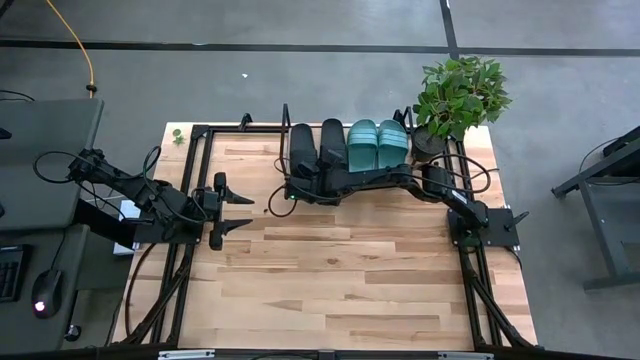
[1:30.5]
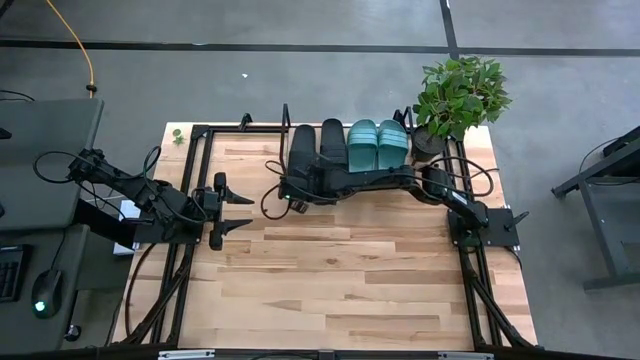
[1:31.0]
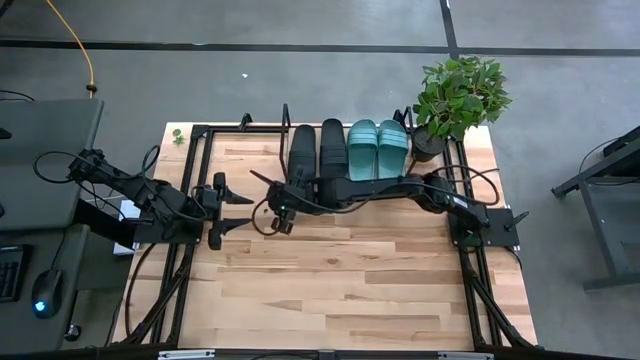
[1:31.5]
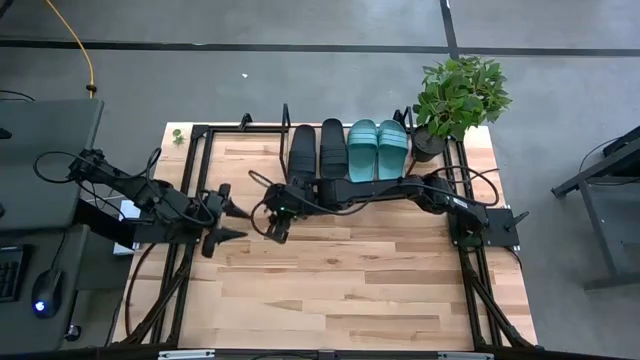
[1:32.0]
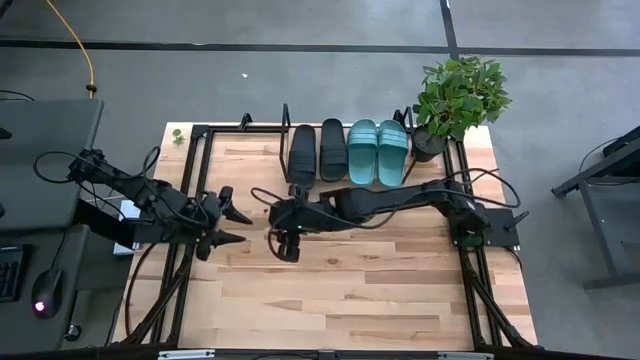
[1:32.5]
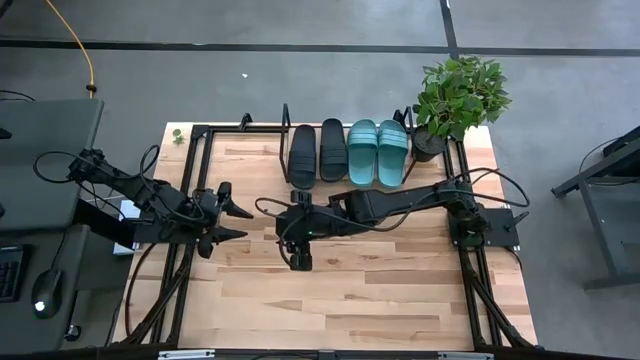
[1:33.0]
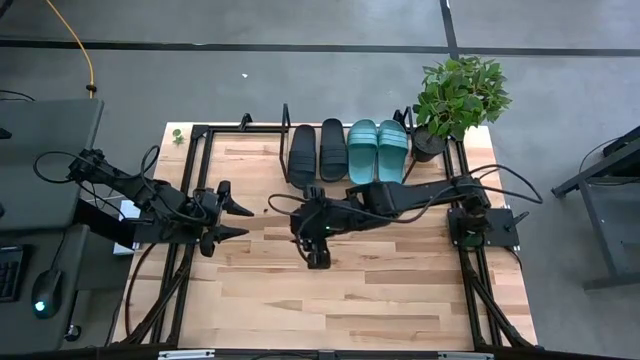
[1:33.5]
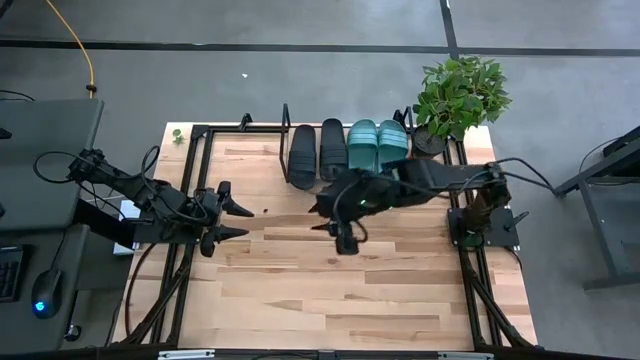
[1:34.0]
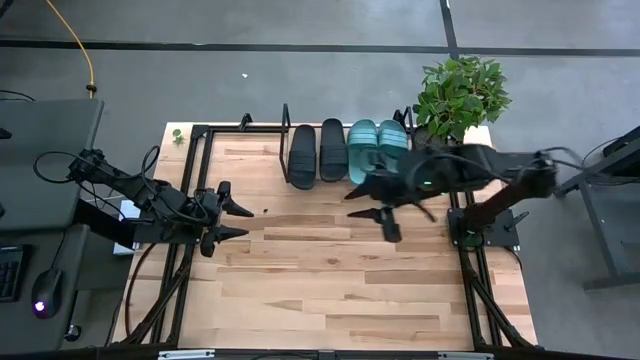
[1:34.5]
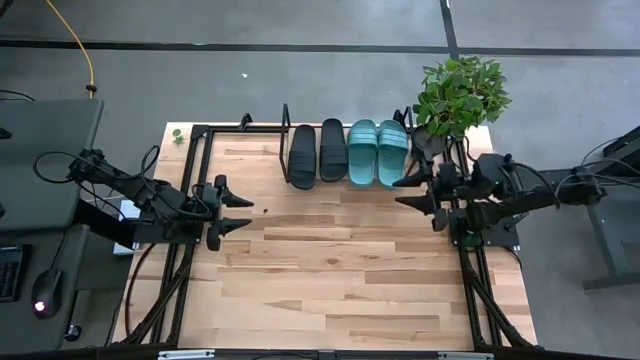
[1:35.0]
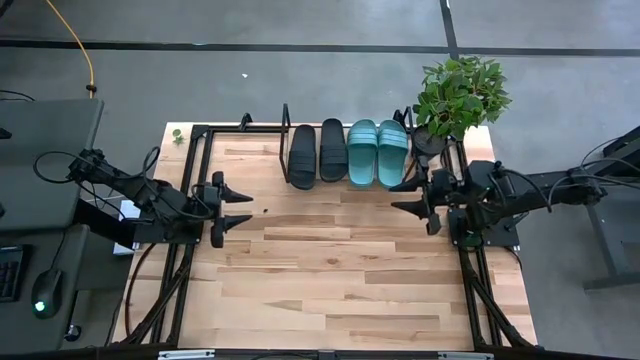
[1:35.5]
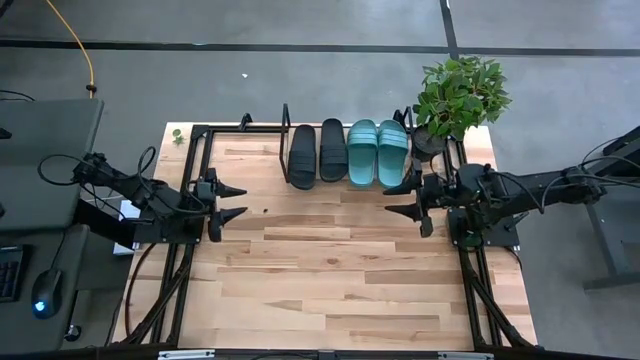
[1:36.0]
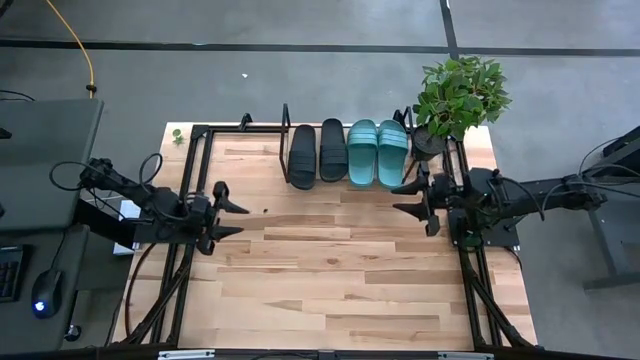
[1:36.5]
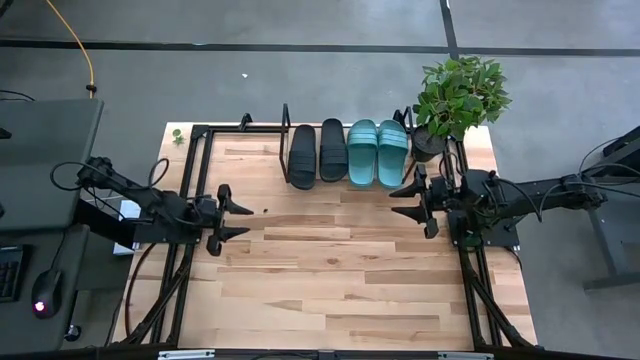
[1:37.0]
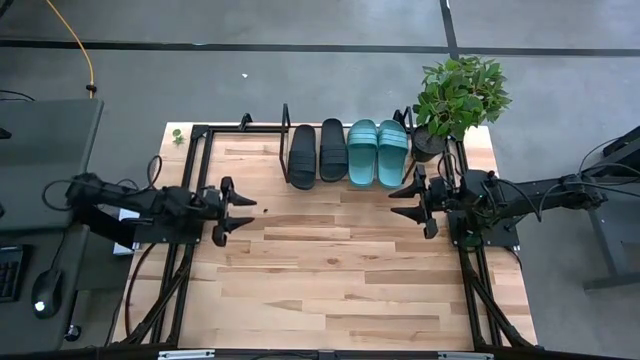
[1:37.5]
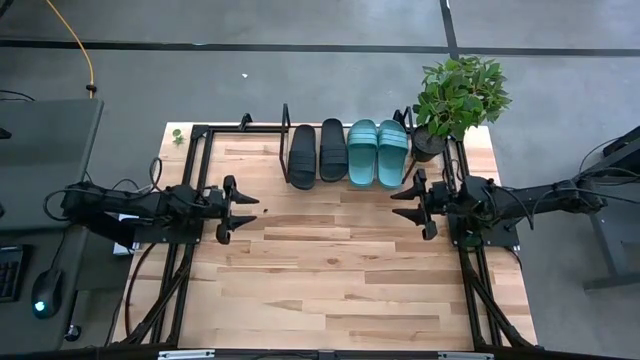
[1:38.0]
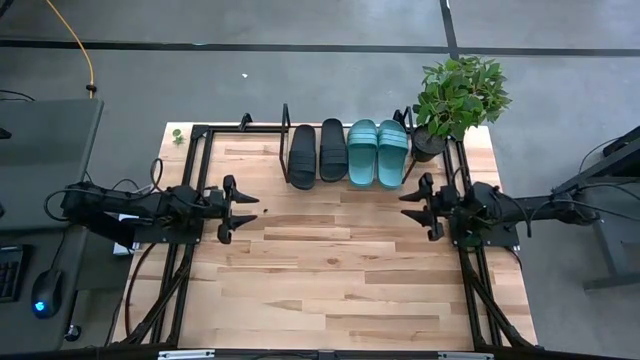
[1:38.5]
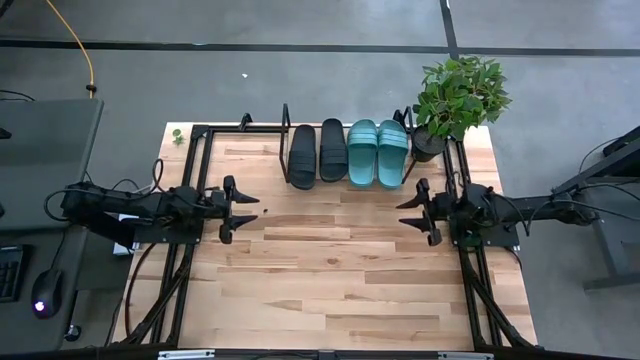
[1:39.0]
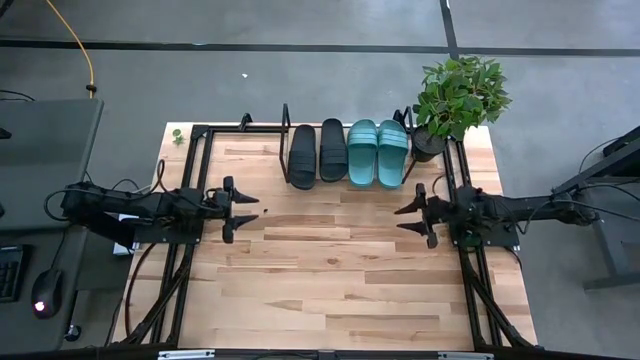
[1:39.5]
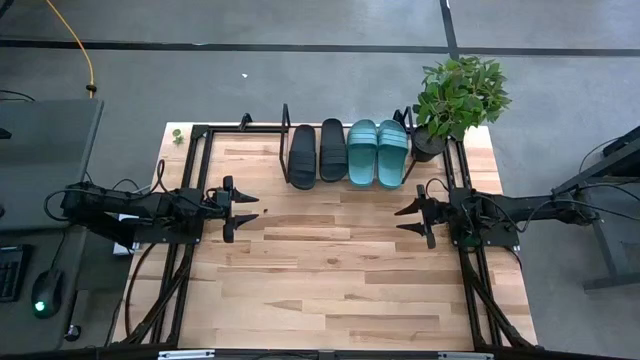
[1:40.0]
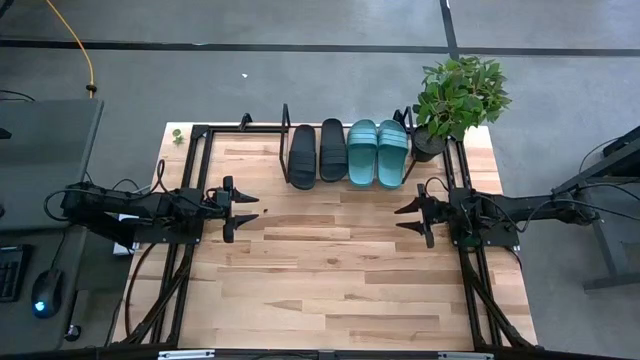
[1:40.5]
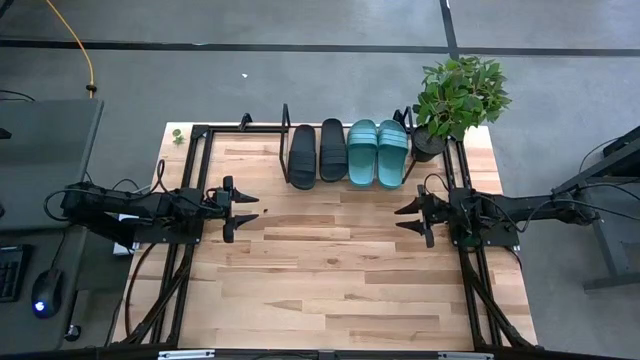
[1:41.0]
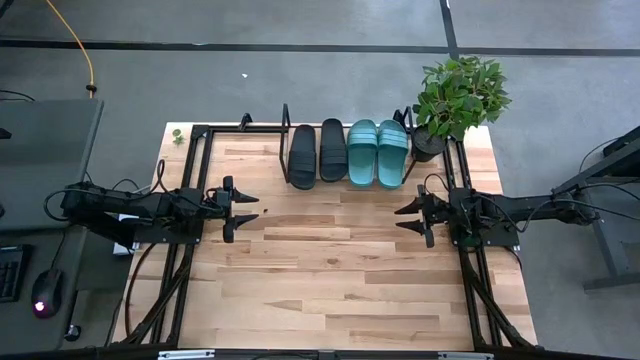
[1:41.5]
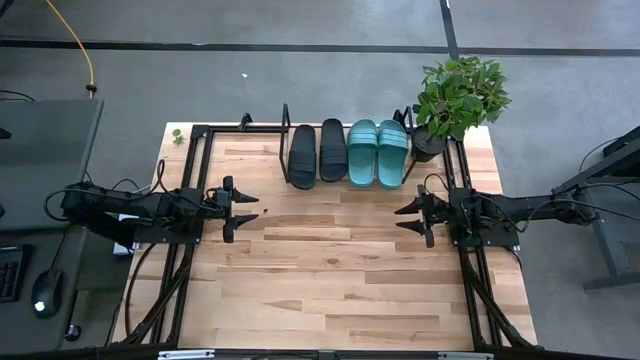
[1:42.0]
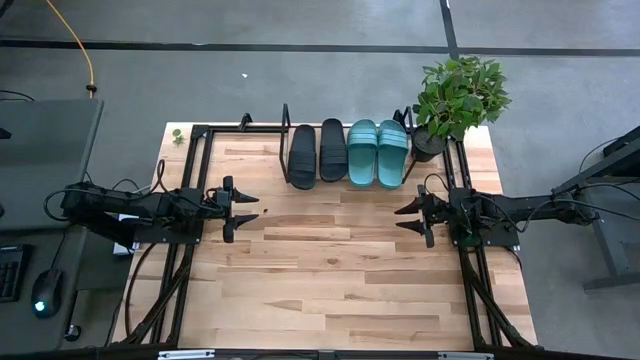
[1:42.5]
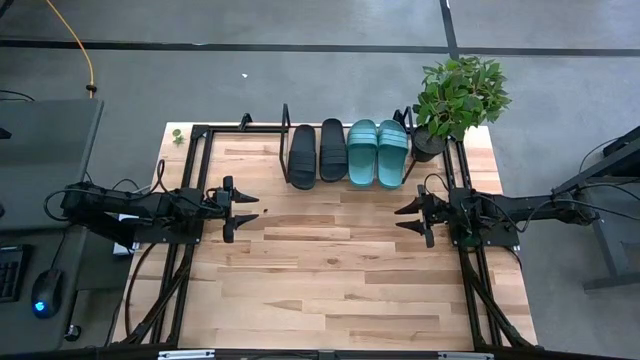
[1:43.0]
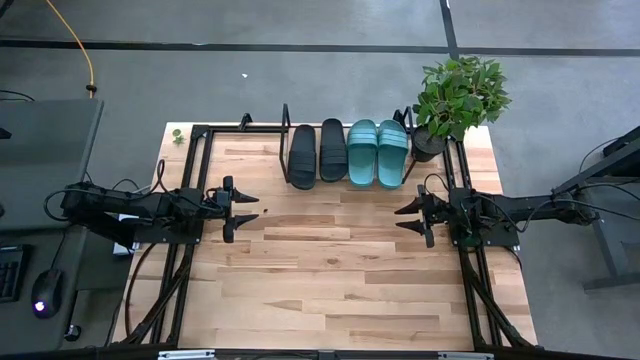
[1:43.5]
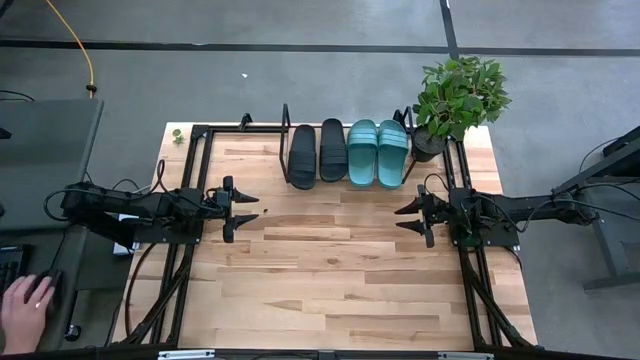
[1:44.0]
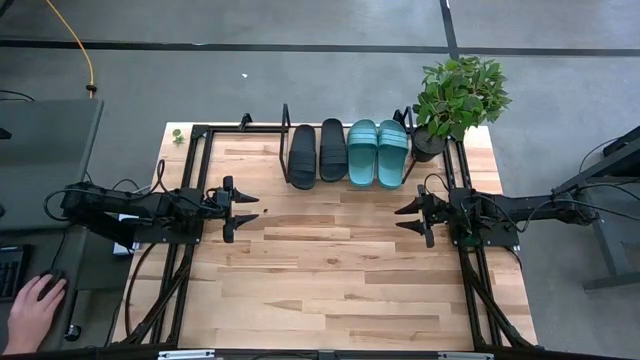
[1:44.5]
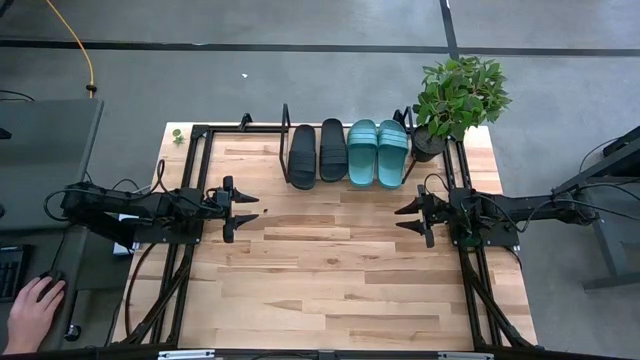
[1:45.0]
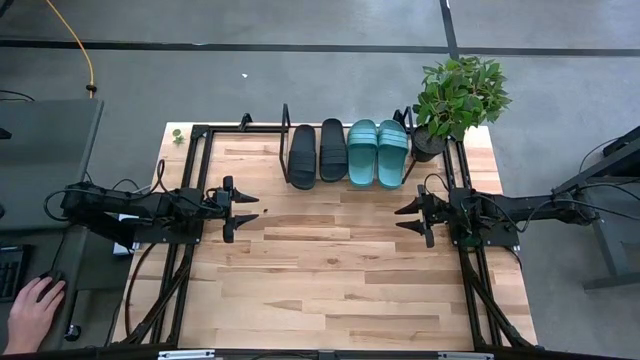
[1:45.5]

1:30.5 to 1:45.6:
Task: Pick and place slides into the shelf
Return to Home Position

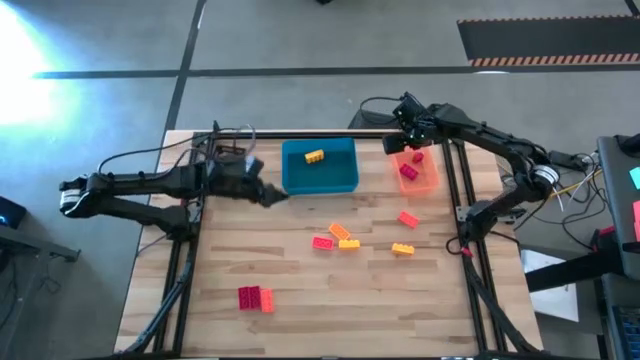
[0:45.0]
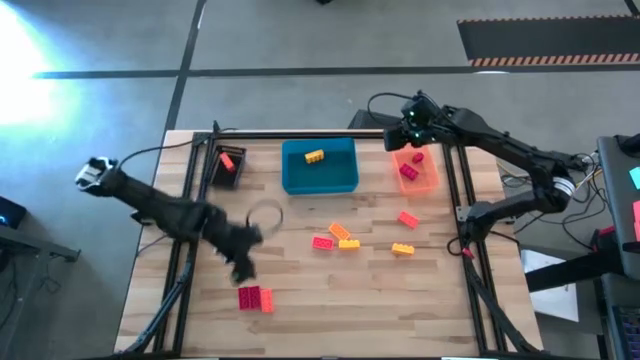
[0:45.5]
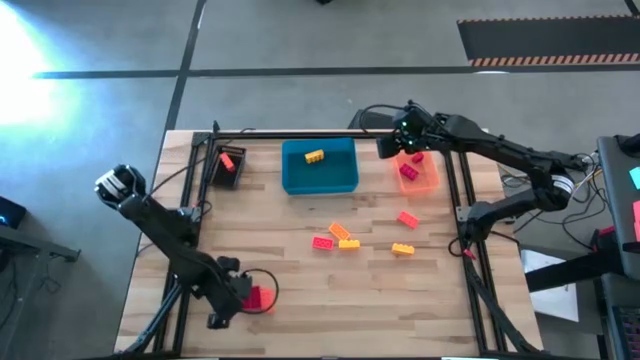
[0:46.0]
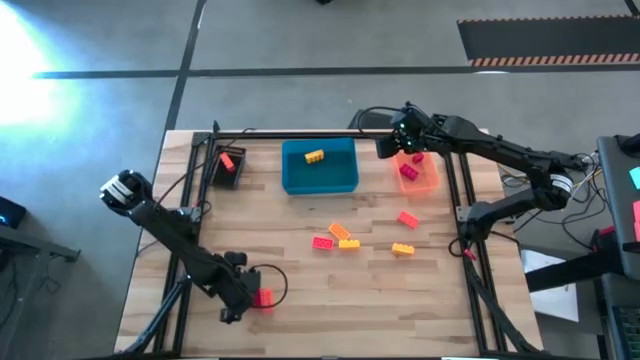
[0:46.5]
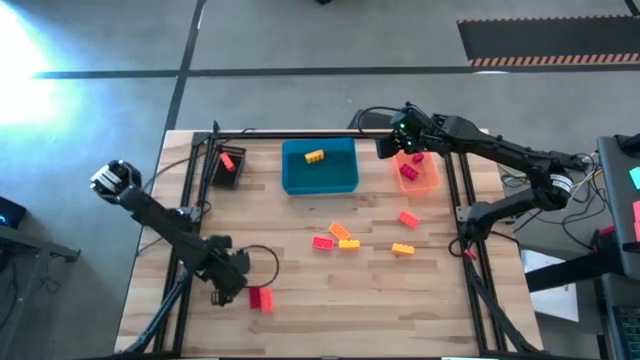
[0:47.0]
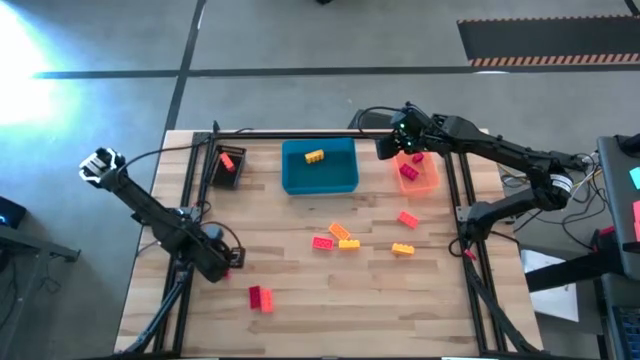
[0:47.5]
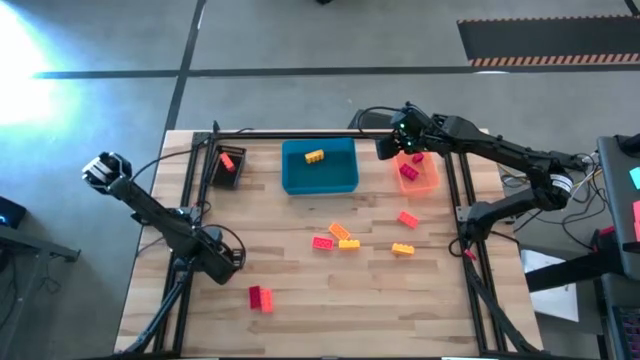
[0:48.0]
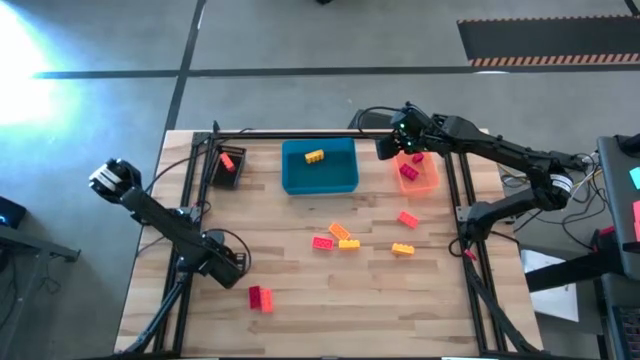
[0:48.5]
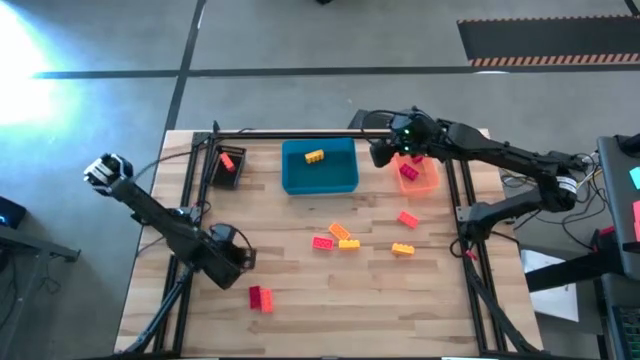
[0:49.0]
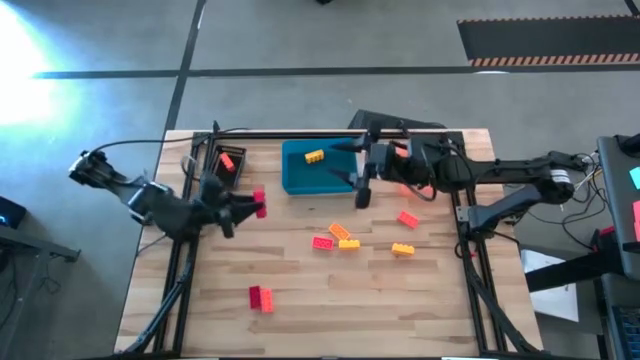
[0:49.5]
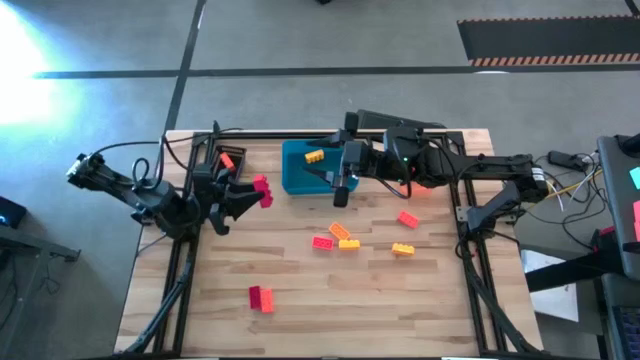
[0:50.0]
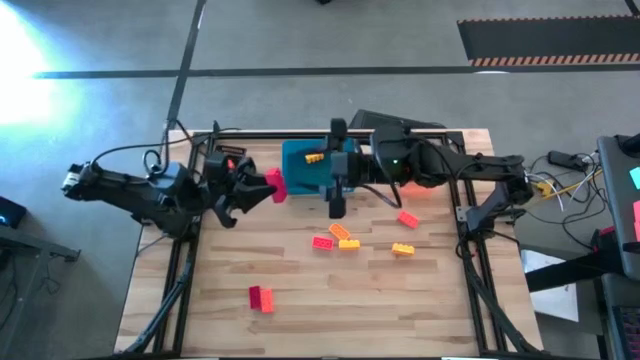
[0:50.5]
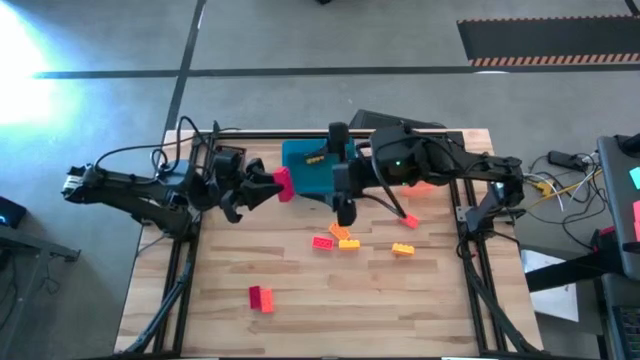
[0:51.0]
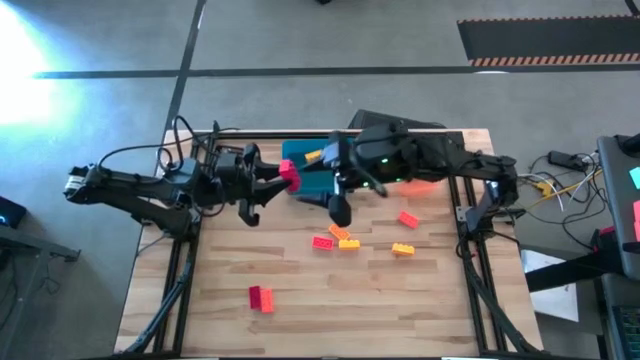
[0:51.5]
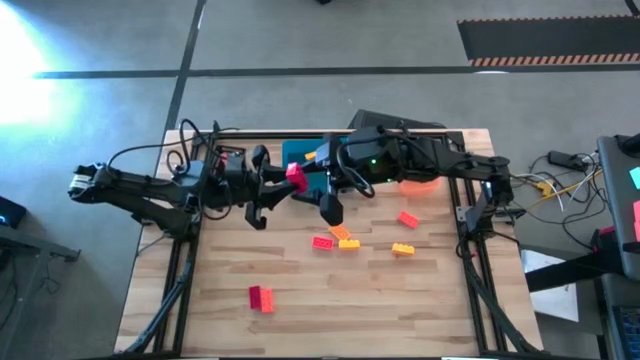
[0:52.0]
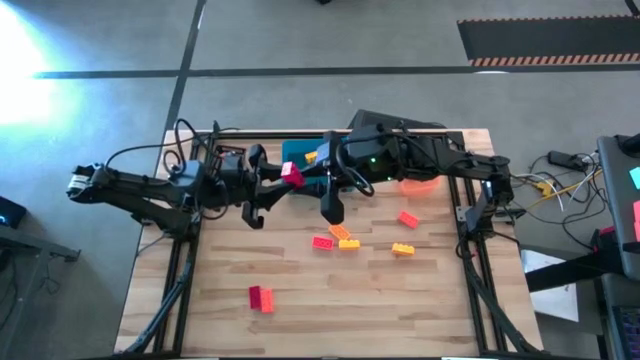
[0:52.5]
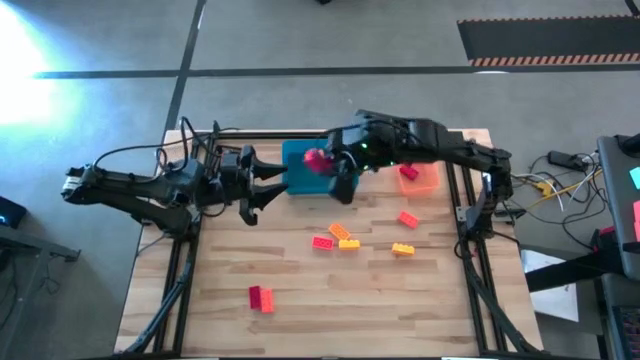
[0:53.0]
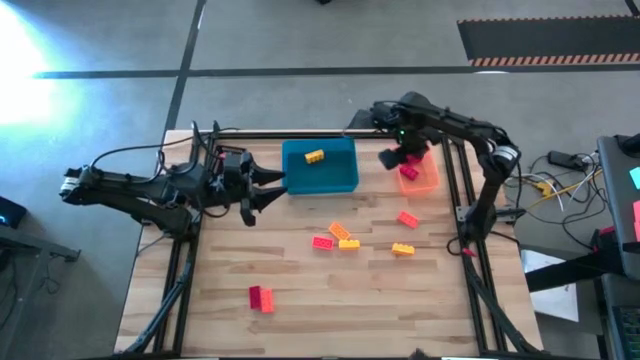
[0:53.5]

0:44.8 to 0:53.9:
Task: Sort & place blocks by color
Put the red game piece into the orange bin
